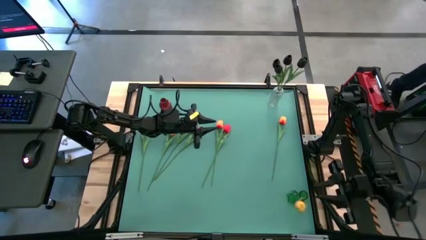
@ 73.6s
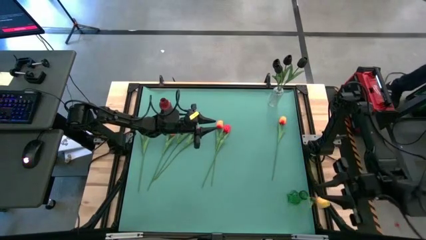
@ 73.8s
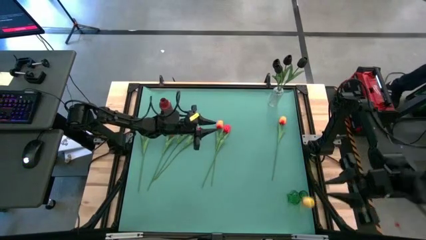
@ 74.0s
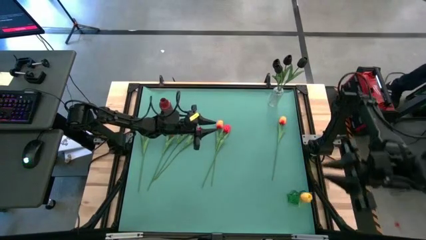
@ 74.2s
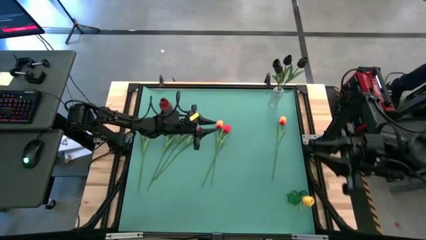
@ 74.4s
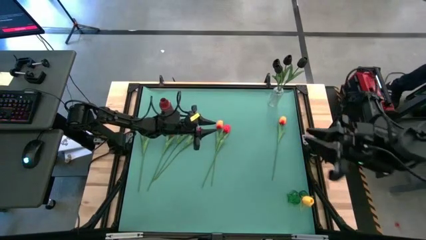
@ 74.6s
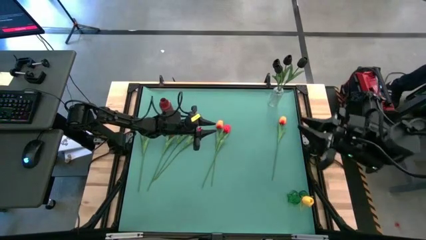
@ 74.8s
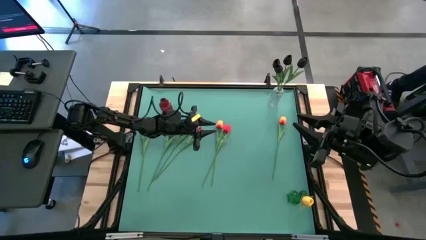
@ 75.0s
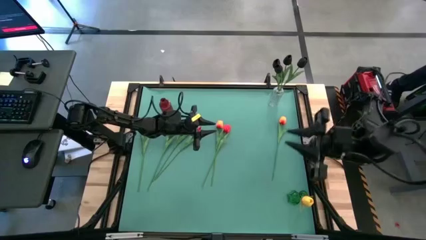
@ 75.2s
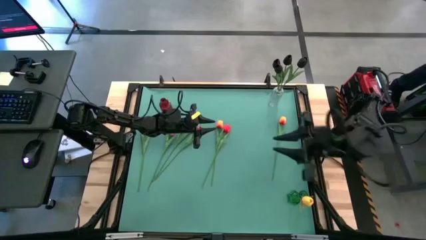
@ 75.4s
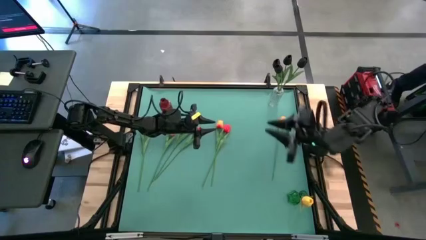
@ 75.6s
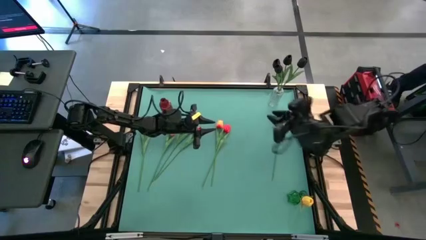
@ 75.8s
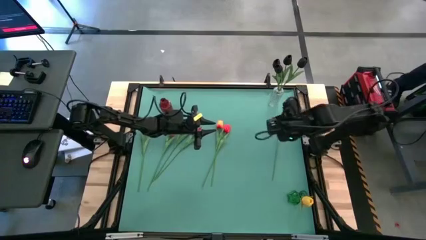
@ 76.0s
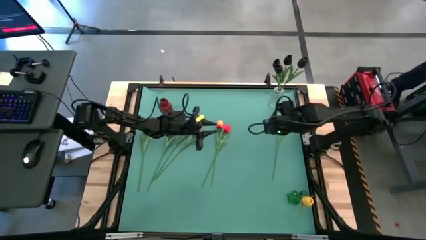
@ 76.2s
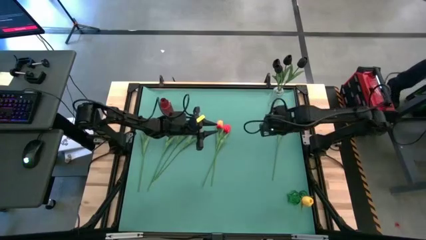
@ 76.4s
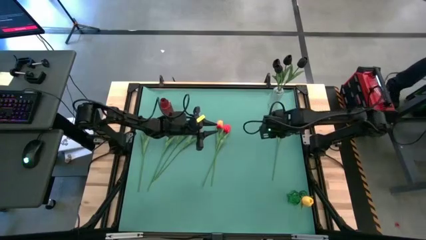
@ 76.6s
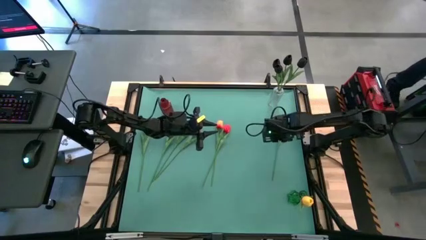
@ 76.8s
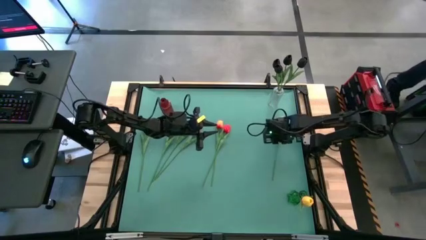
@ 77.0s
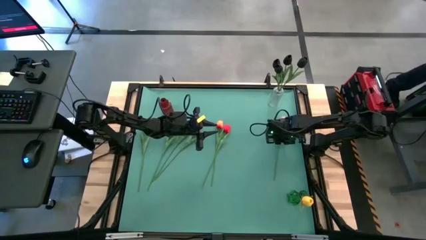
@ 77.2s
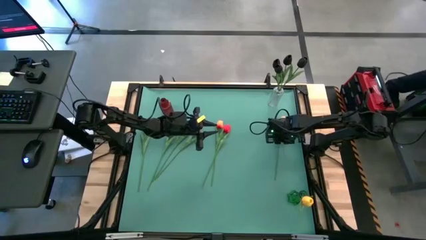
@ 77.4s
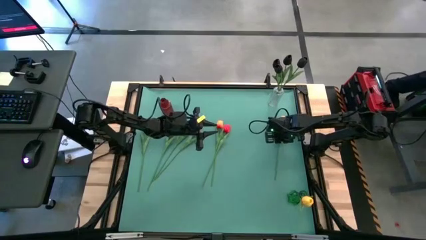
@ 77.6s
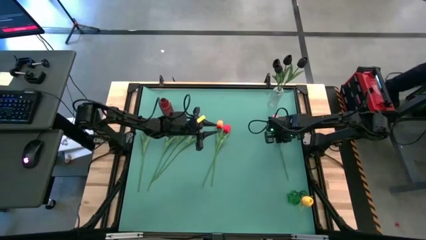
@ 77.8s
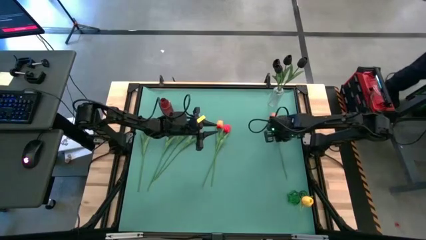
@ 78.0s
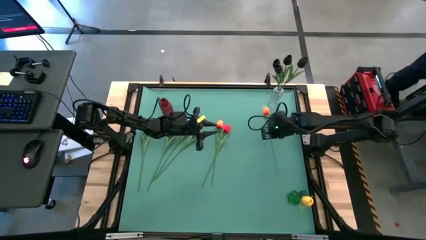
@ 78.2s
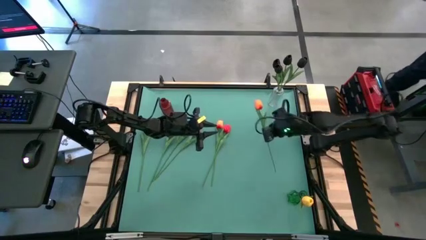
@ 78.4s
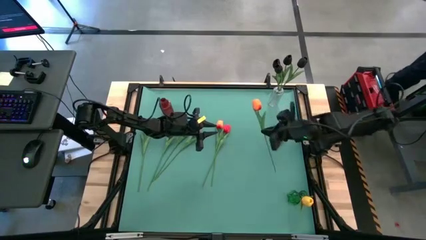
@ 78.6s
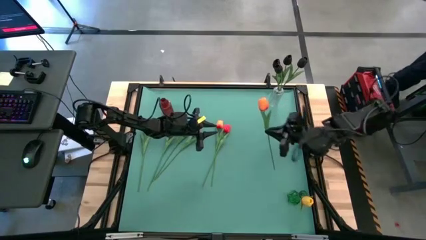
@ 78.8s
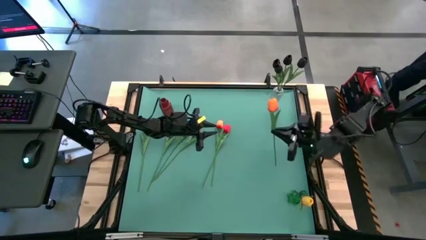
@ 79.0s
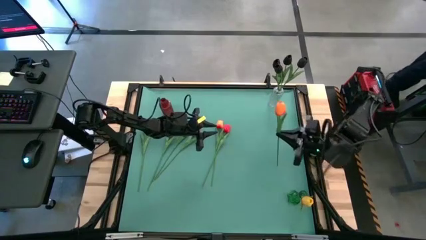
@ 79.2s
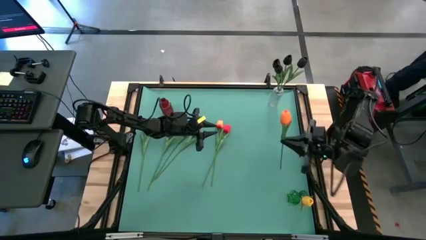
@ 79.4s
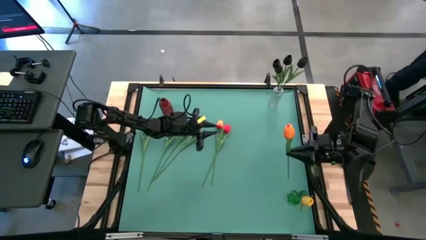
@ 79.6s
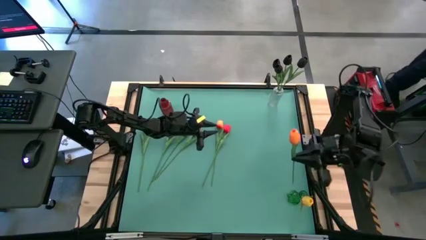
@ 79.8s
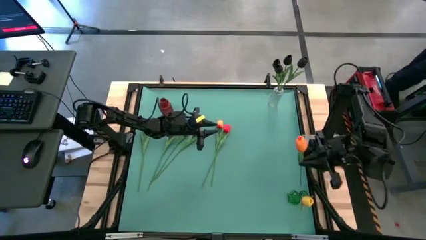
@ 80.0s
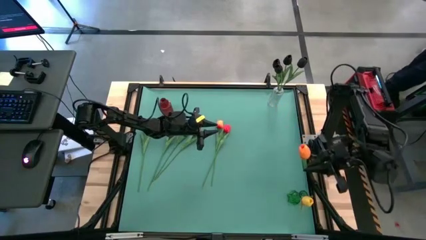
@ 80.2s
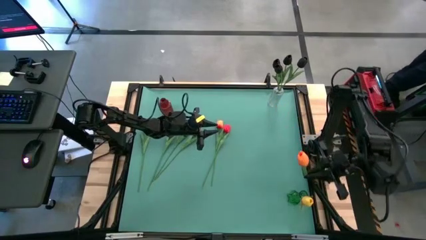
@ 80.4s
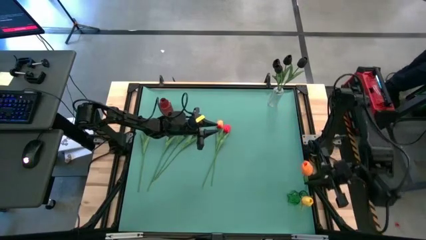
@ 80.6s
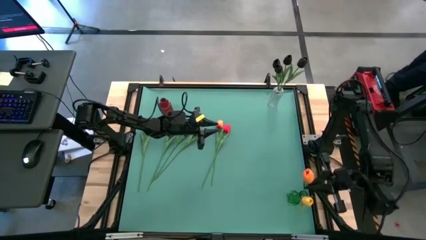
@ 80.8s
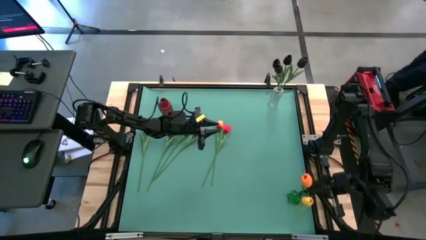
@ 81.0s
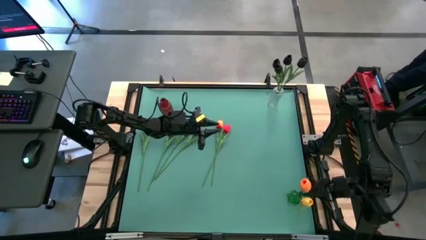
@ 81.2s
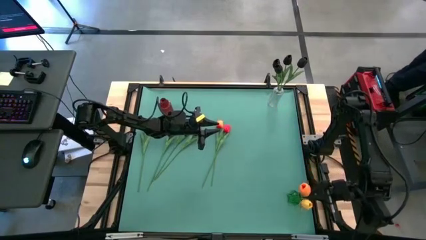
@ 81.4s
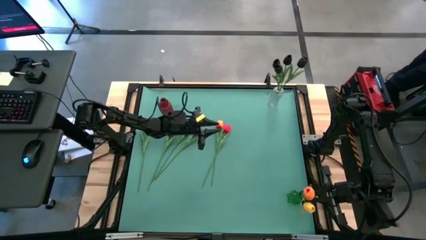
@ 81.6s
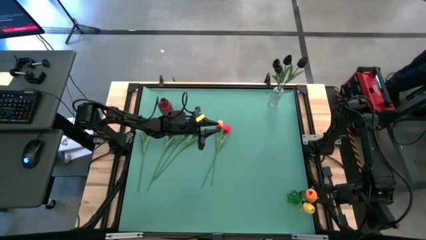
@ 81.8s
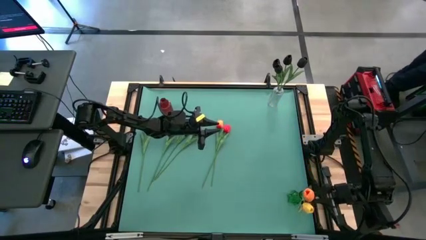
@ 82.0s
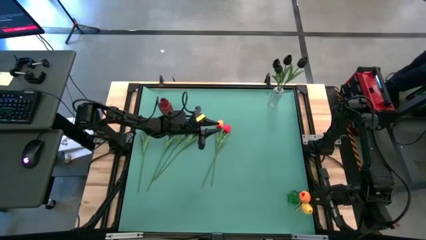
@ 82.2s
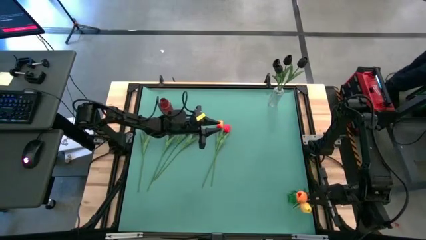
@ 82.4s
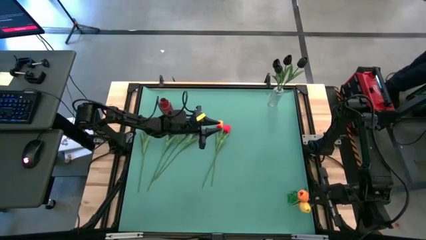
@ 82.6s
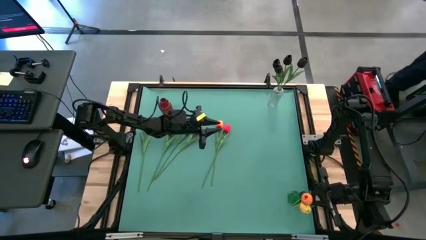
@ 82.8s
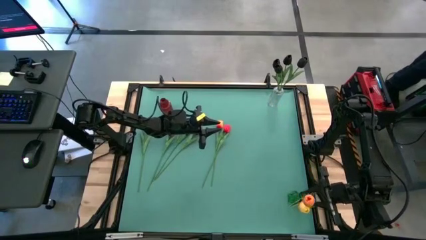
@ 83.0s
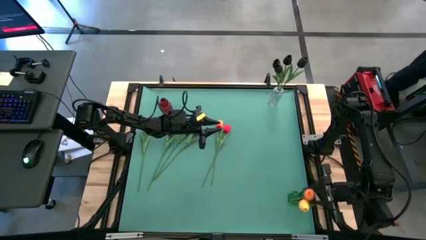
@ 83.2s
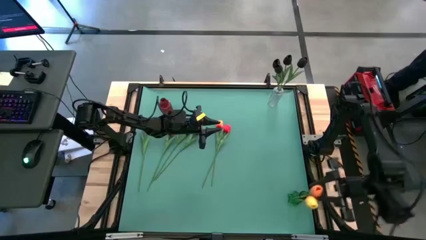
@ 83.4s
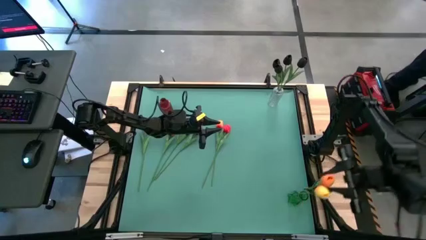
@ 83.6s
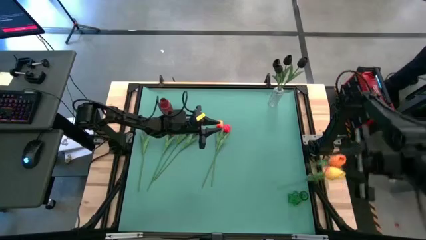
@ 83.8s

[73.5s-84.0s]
Task: Sort flowers into vase by color
Put the orange tulip into the green vase

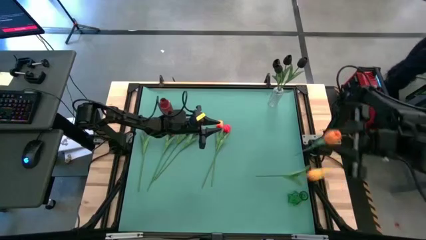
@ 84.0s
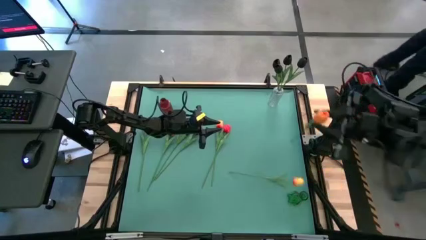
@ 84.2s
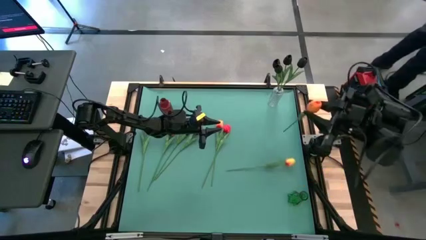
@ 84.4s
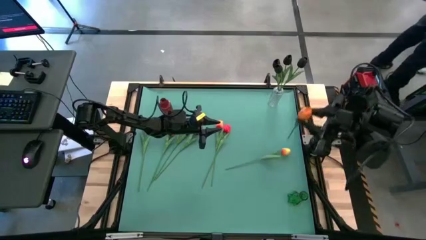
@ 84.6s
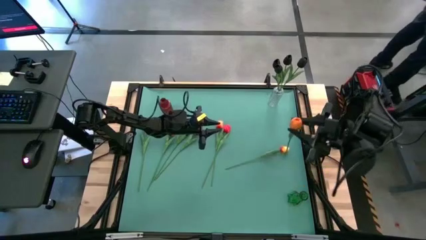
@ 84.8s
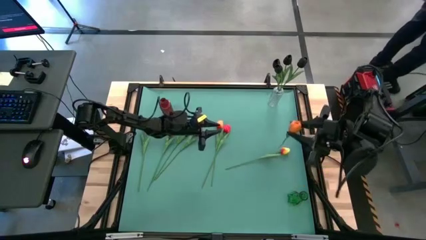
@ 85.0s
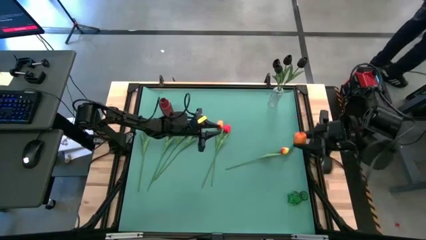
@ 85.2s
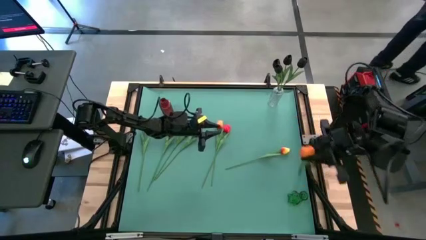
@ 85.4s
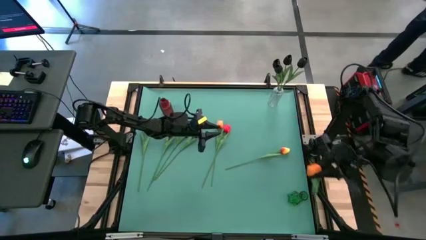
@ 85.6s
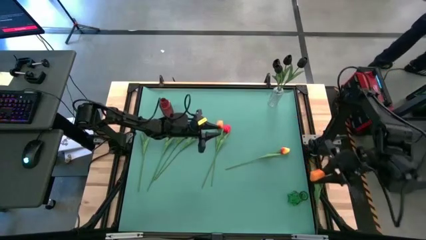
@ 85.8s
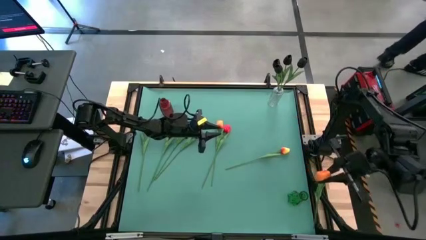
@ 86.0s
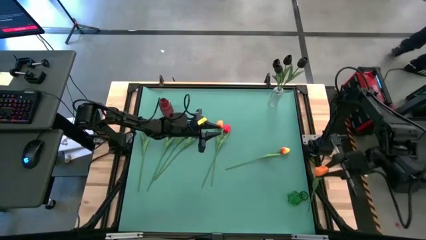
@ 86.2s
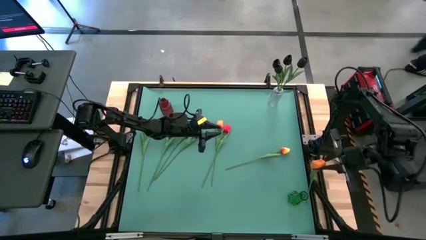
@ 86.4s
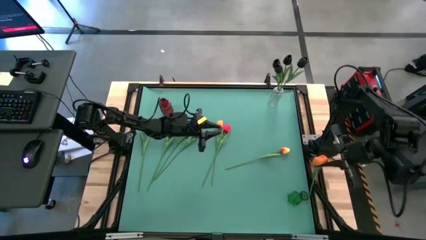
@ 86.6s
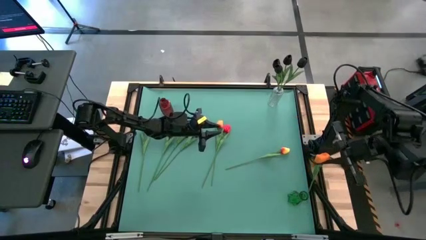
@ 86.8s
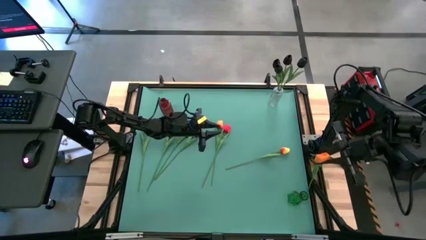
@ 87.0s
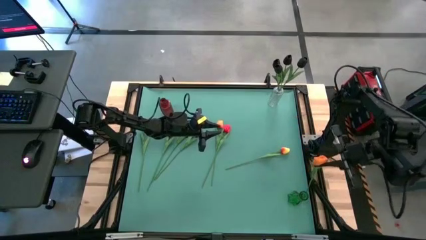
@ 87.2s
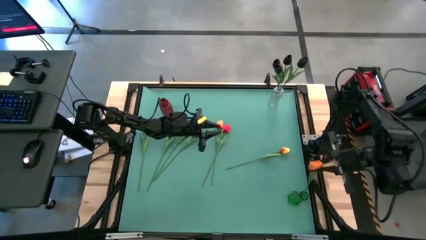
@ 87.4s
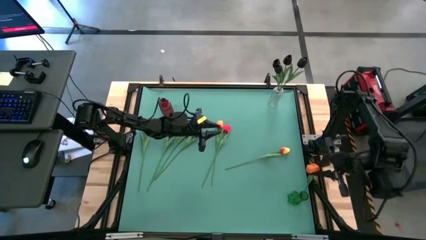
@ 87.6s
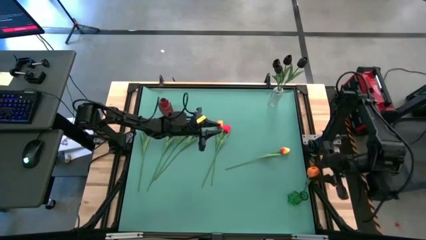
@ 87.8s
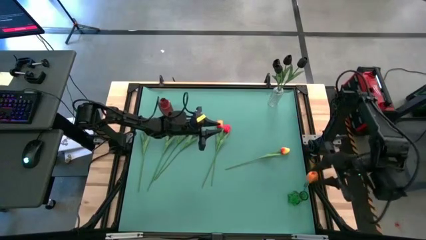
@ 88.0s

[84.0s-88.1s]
Put the orange tulip into the green vase
